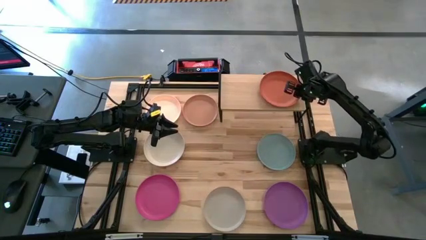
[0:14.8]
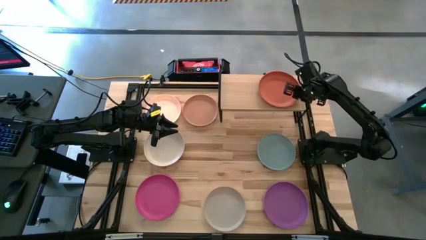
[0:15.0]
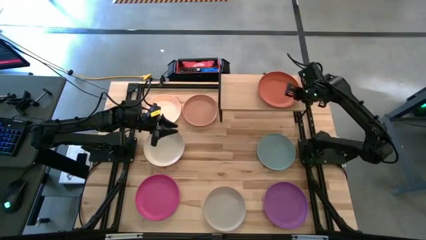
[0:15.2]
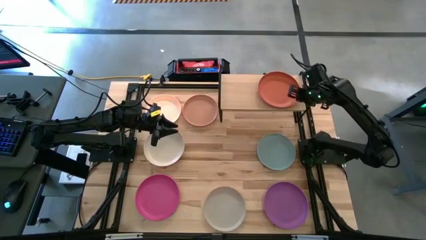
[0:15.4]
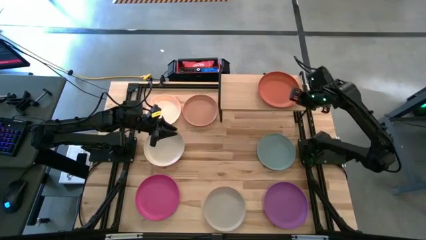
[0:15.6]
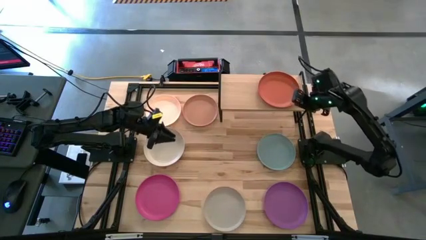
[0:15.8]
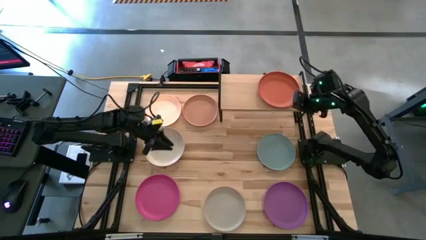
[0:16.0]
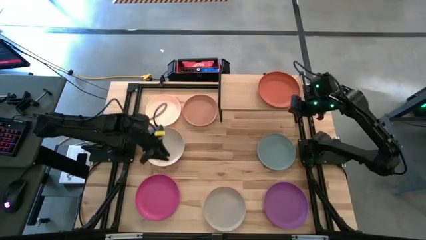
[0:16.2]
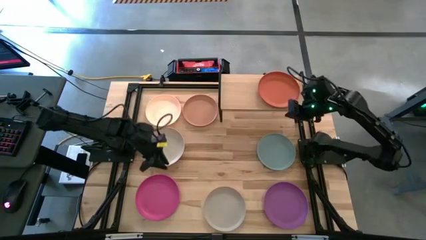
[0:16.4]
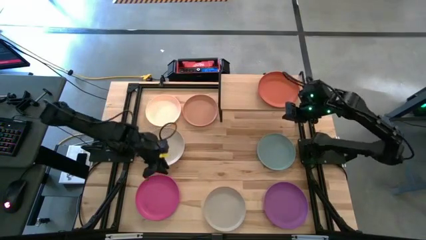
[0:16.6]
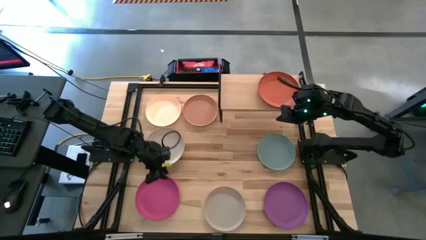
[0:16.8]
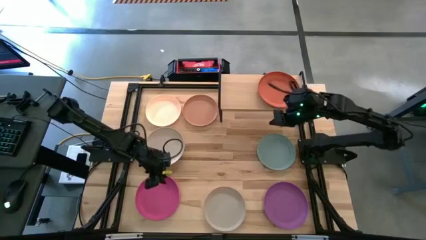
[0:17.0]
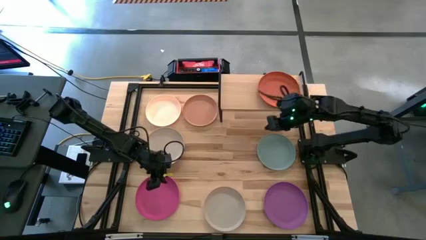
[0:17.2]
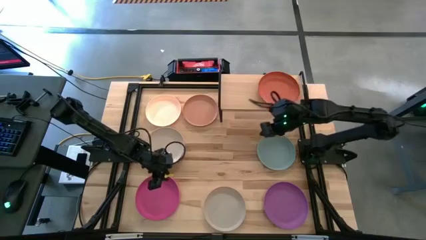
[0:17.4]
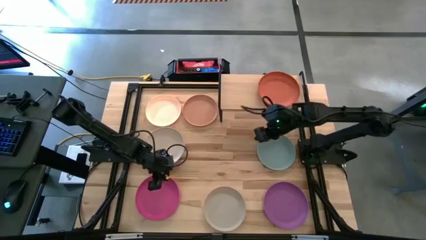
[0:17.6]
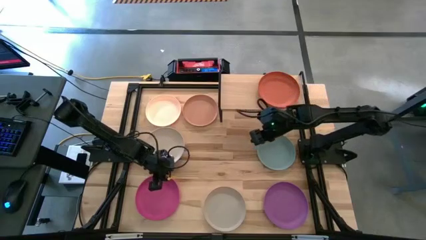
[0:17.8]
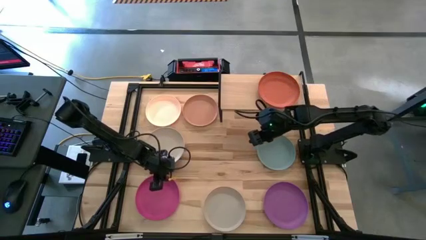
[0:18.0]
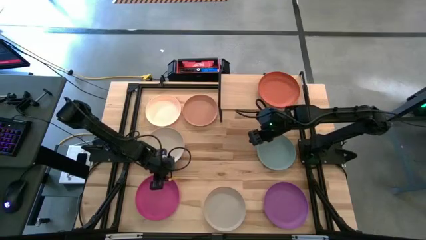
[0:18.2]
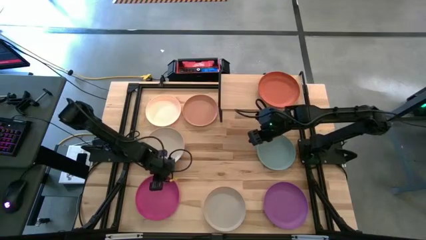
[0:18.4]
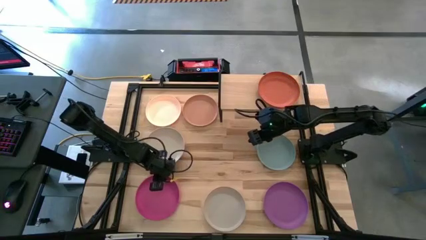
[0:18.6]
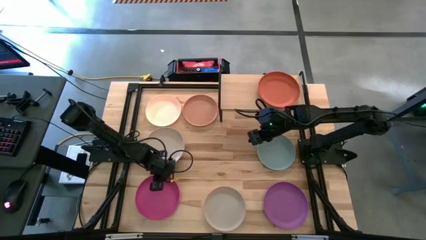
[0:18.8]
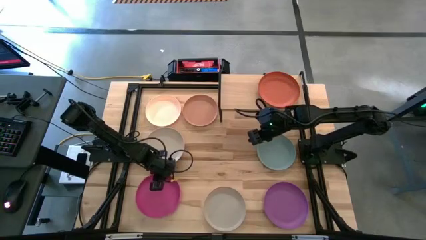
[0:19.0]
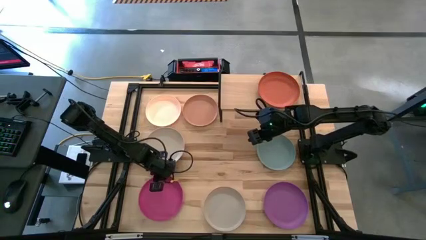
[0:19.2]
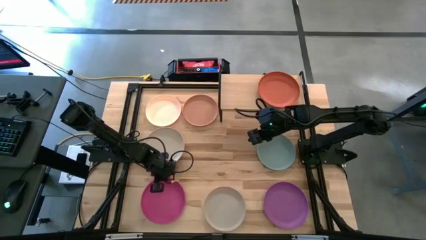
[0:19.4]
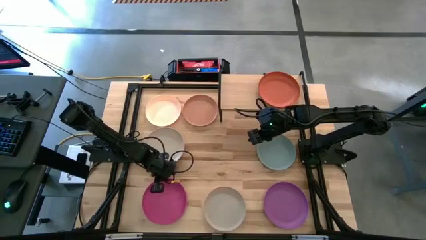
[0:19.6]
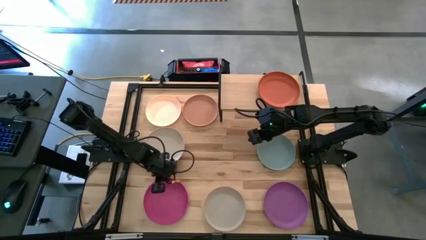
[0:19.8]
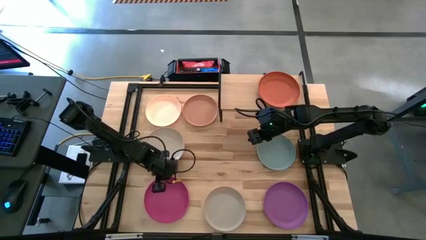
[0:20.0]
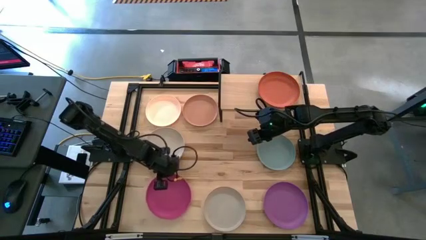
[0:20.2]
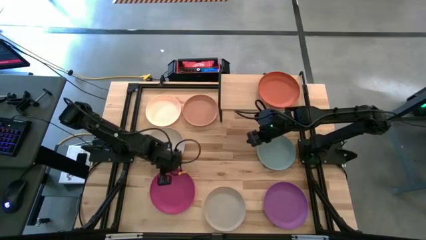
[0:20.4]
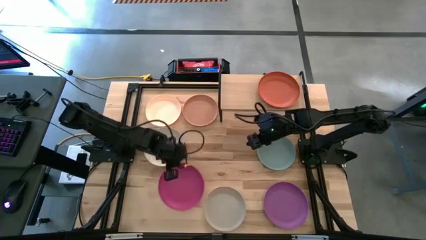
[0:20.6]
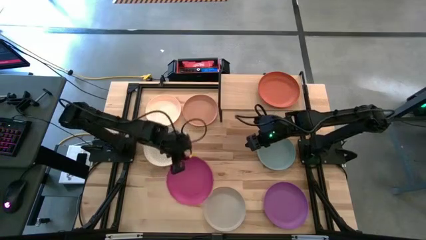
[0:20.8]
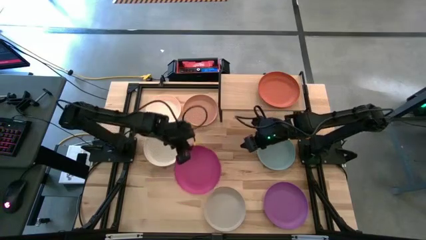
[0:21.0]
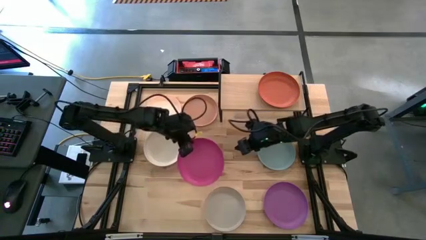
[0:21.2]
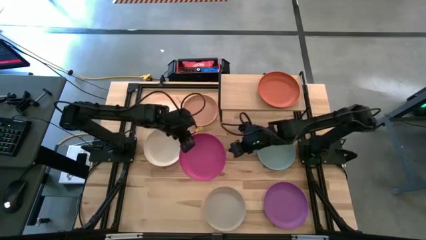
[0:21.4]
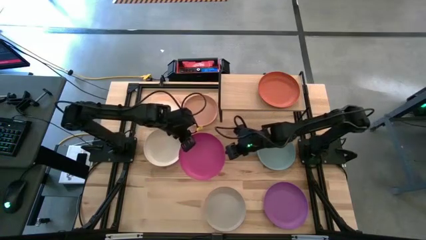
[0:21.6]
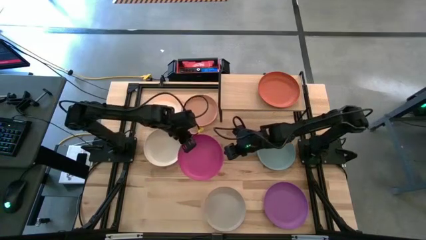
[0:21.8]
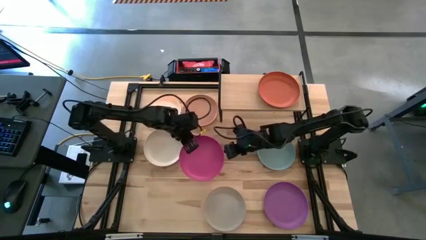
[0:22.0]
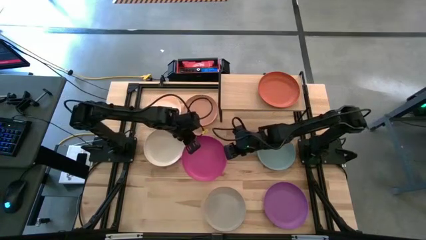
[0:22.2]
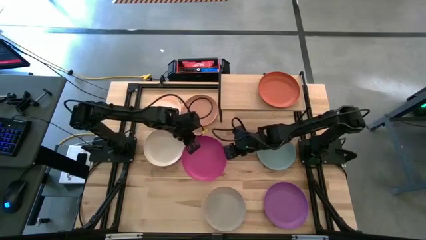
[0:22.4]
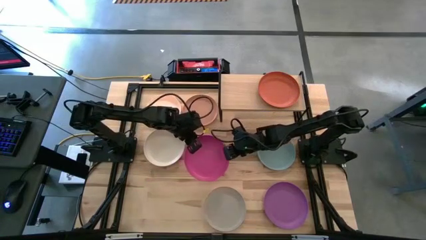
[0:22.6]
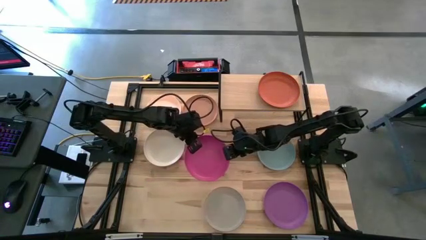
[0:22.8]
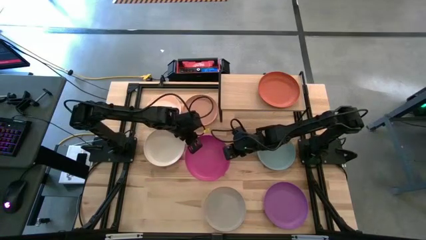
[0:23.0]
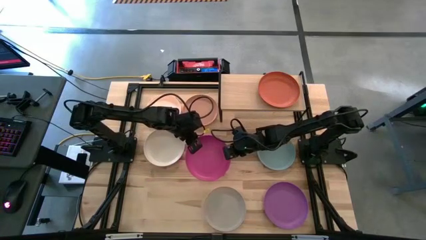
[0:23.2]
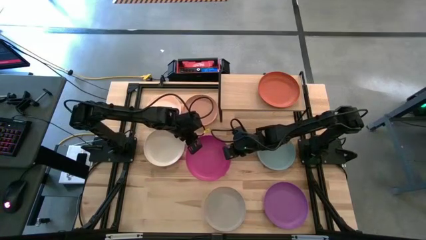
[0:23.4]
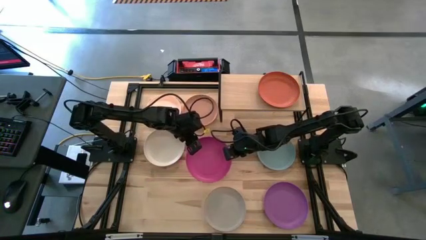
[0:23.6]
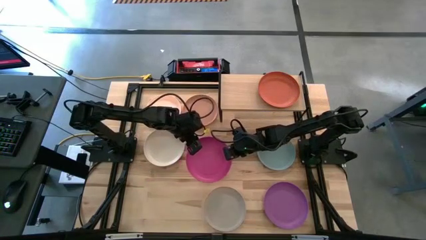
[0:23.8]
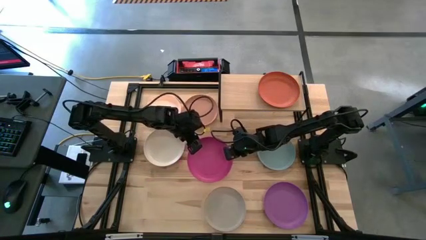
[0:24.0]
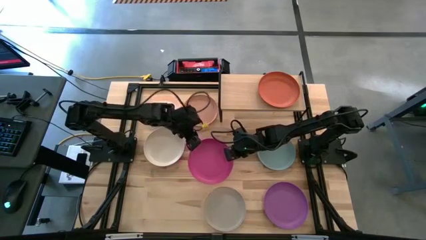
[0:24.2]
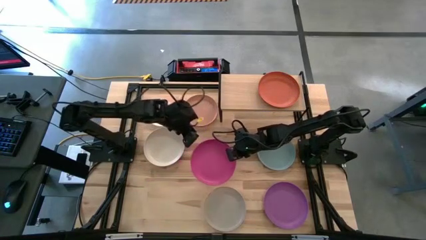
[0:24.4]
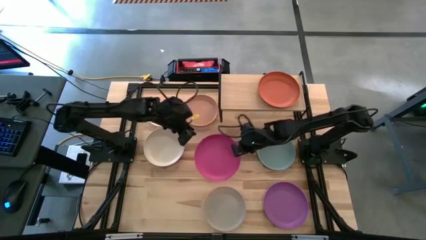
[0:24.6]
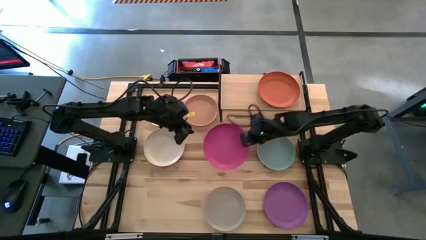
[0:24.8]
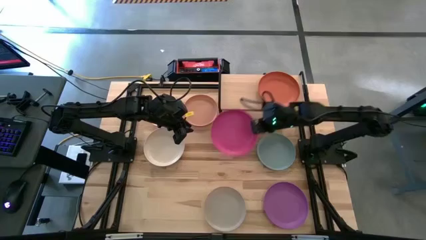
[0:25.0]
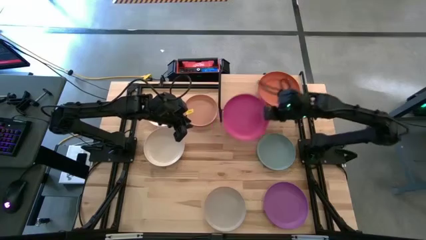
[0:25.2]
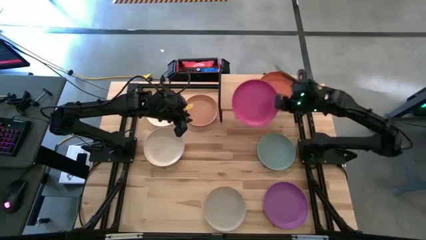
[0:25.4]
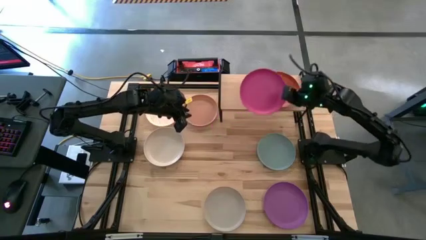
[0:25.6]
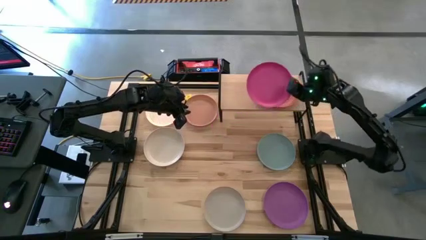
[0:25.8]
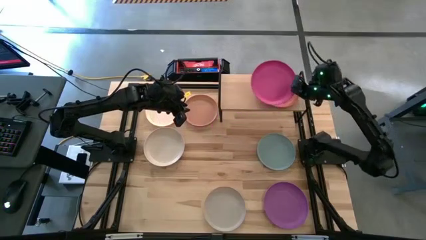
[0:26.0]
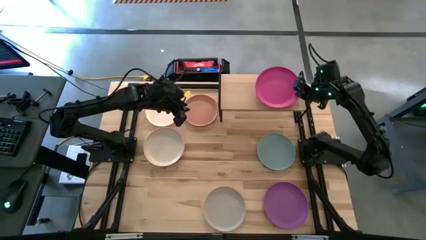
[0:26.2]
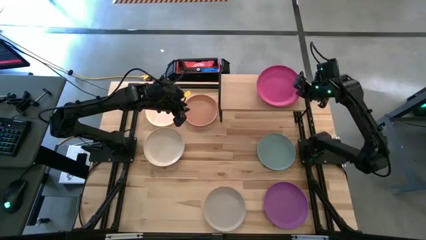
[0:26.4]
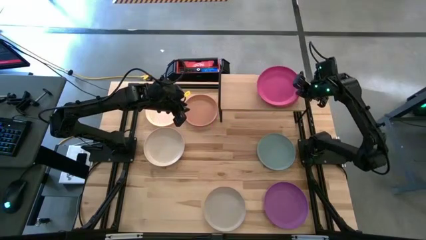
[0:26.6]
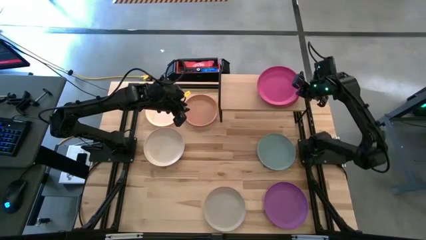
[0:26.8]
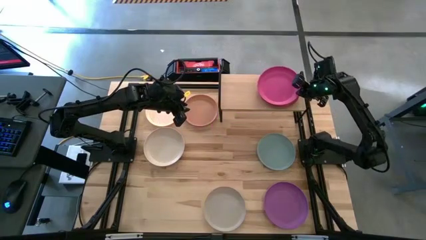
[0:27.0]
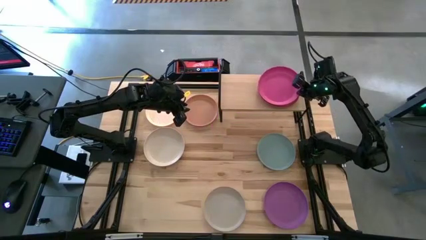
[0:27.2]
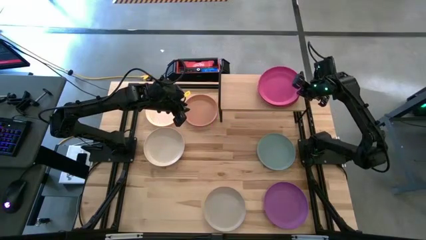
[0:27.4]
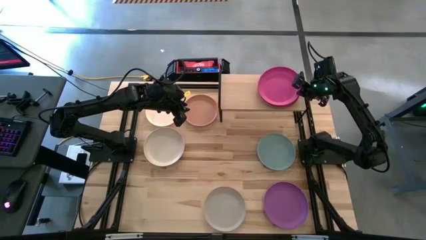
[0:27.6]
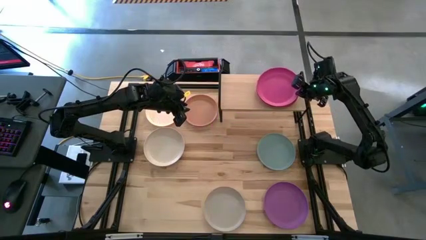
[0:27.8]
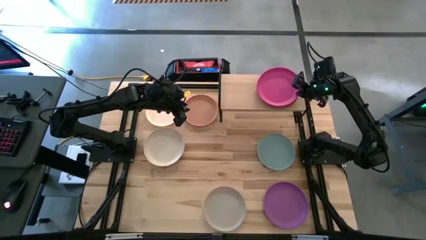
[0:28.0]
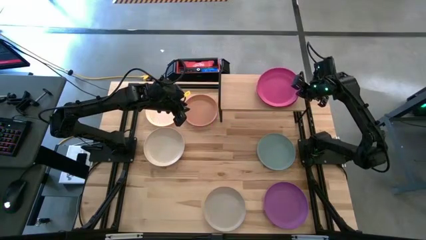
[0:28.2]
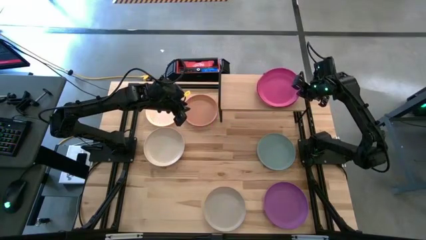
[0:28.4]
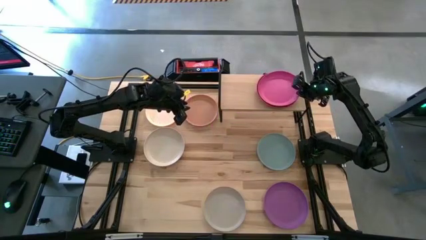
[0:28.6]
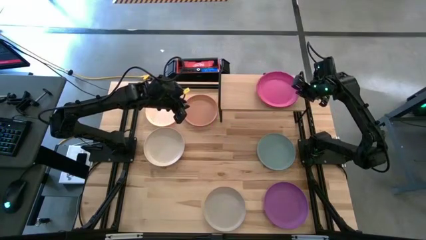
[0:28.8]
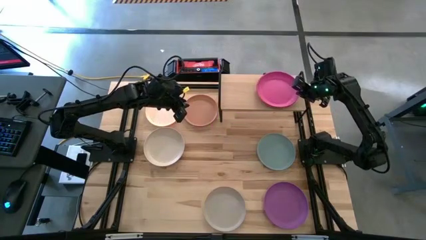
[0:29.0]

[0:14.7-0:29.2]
Task: Place and stack plates onto a shelf
Stack the pink plate on top of the orange plate on the shelf
